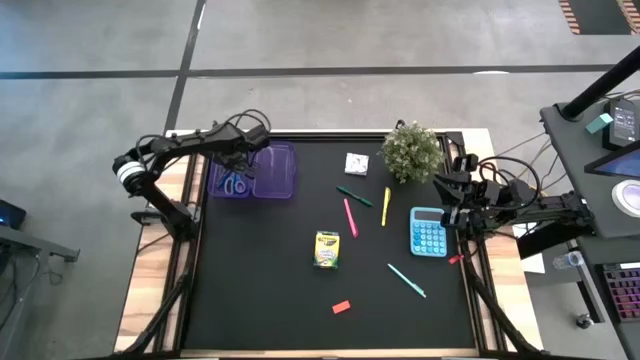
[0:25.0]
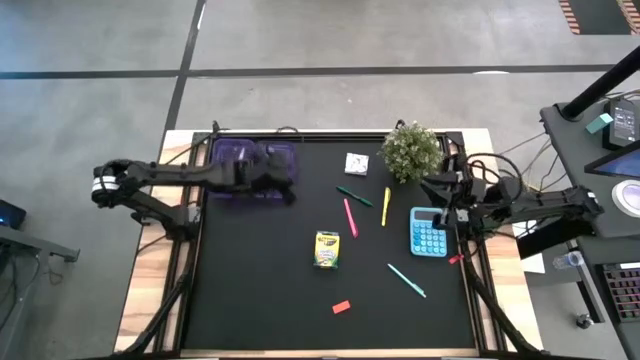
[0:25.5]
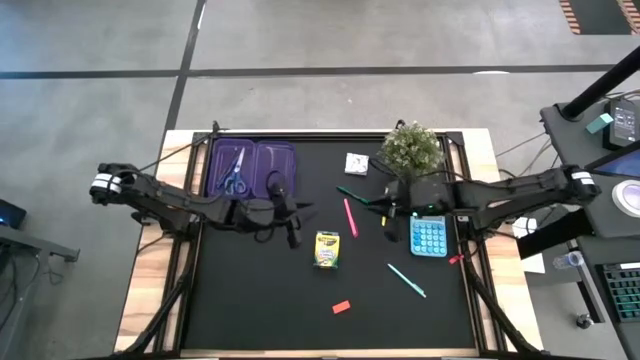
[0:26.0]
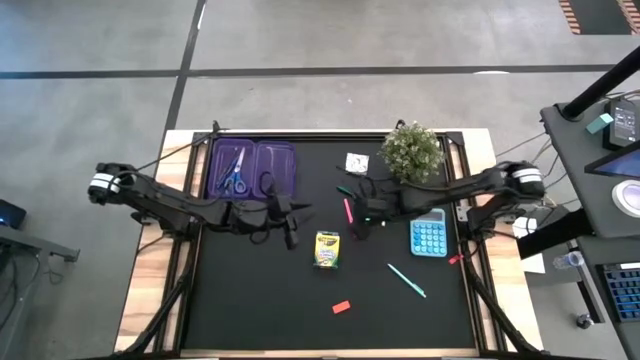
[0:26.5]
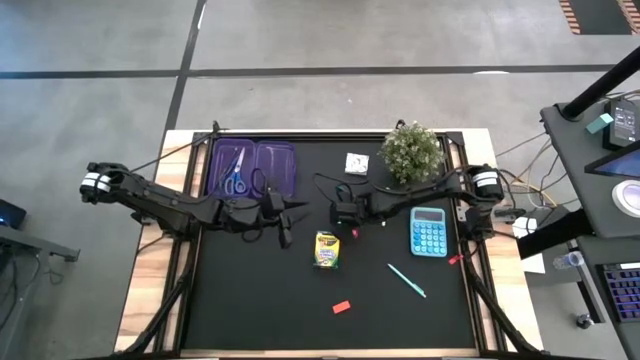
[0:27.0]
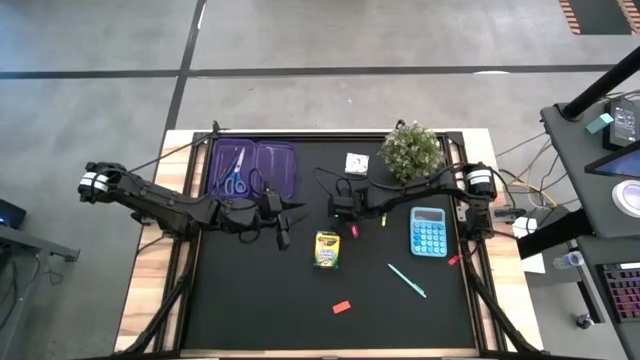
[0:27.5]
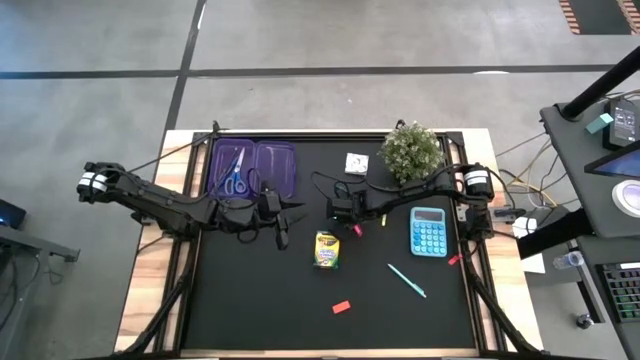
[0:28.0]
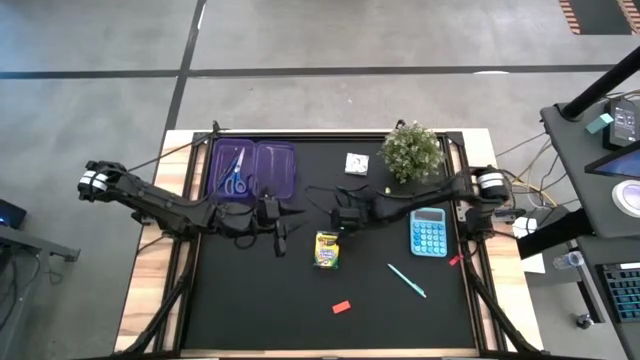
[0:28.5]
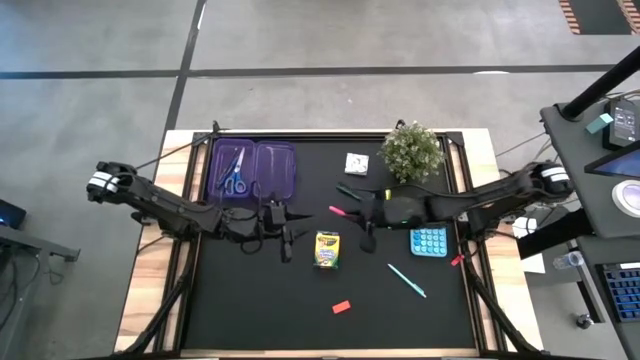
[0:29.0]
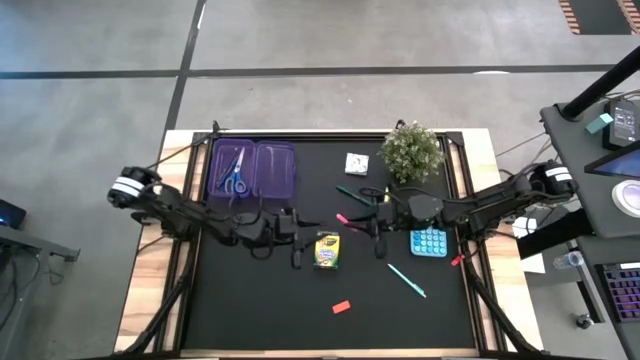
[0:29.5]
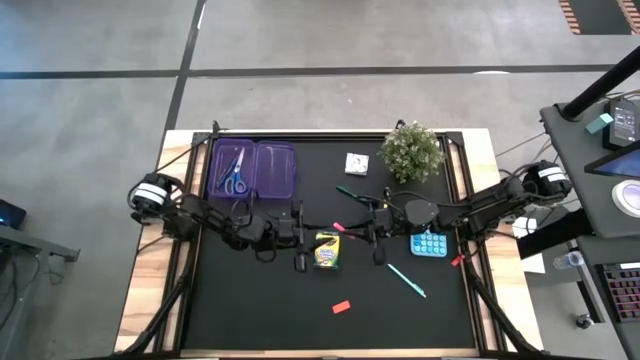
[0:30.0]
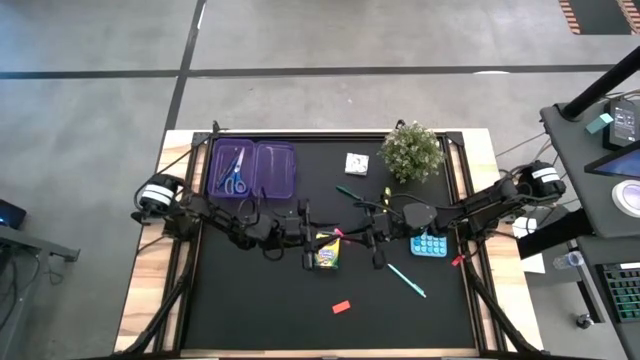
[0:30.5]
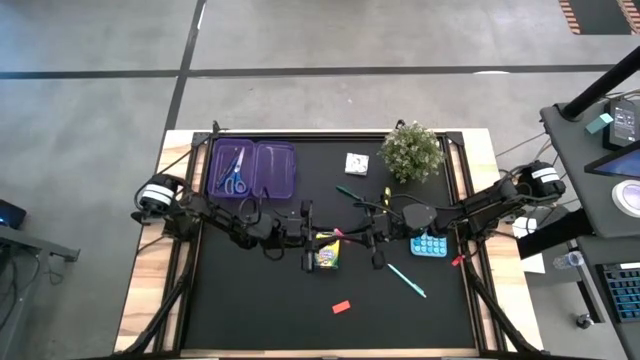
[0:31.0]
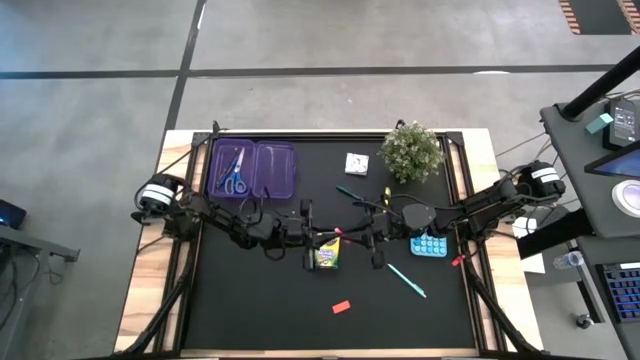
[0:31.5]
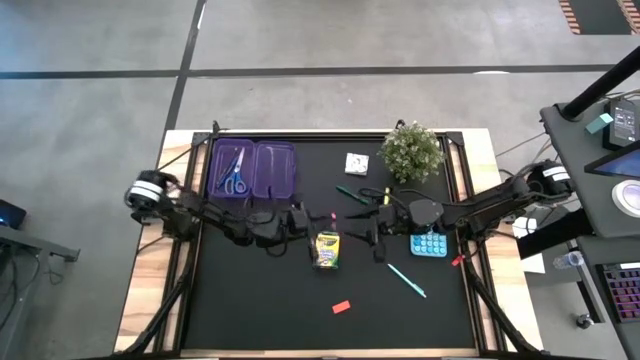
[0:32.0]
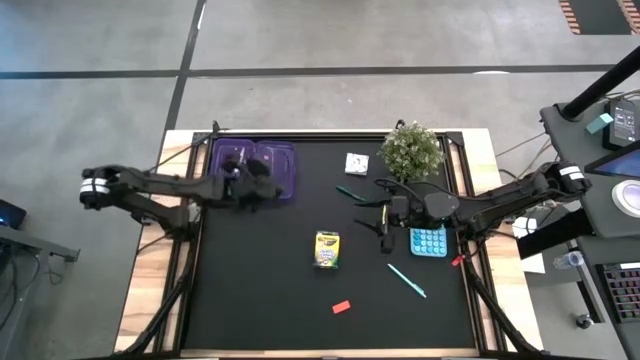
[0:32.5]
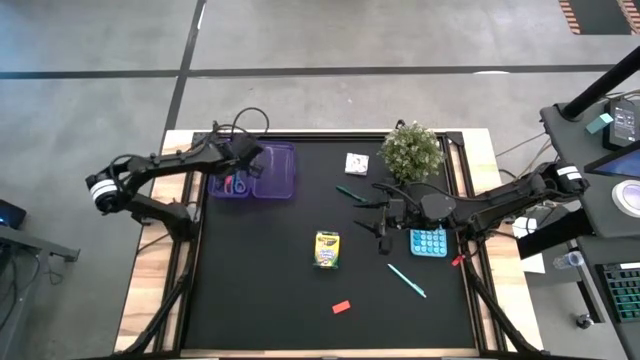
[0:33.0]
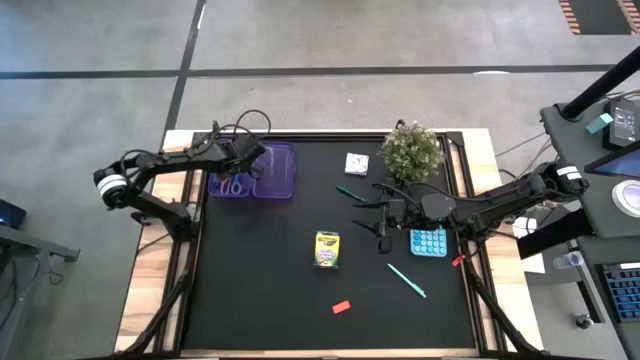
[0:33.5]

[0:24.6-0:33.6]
Task: Pack school essentials
Put the pink pen into the purple supply box

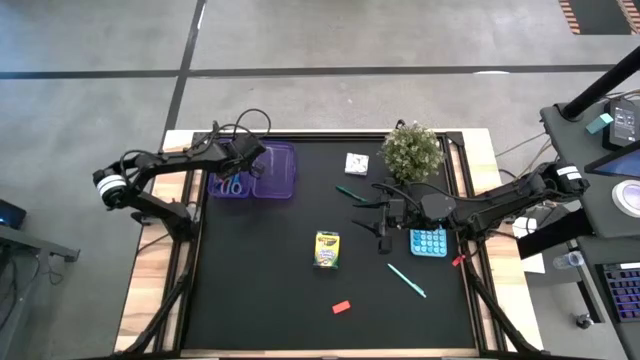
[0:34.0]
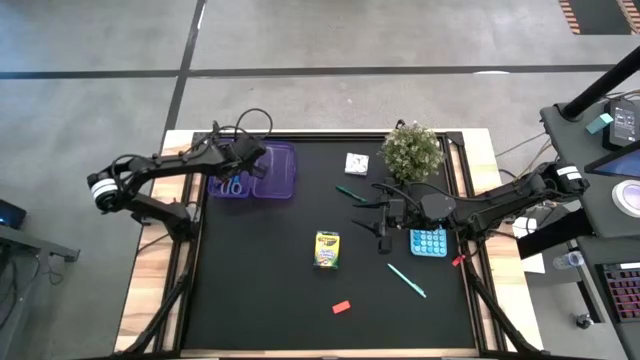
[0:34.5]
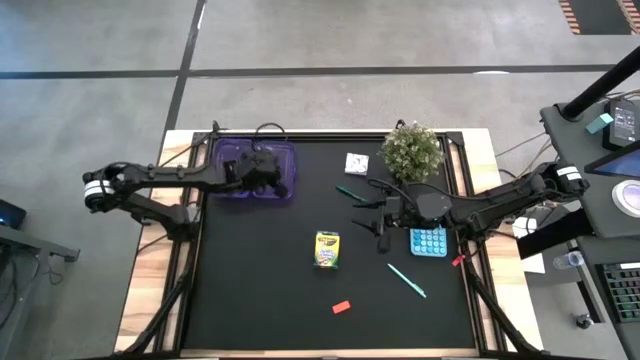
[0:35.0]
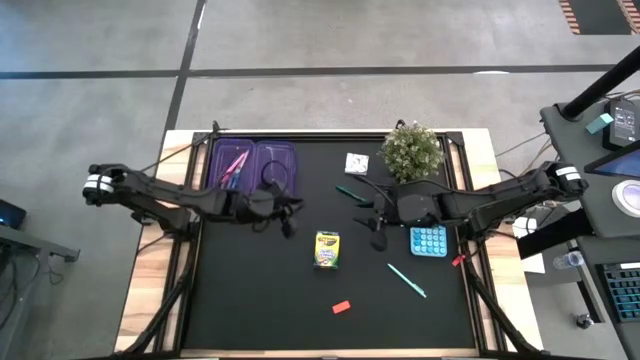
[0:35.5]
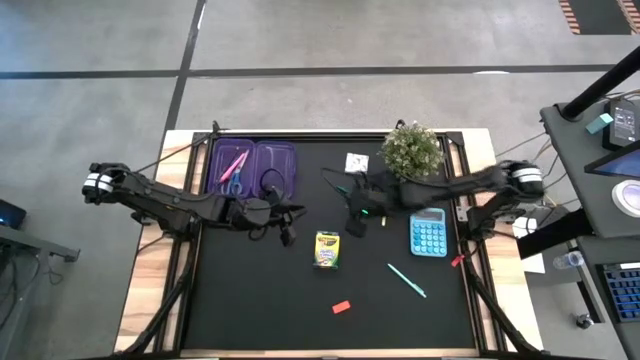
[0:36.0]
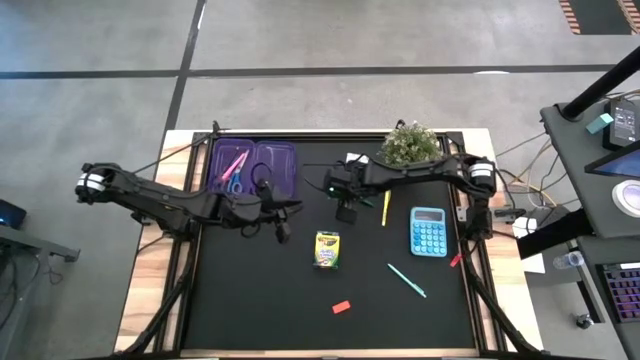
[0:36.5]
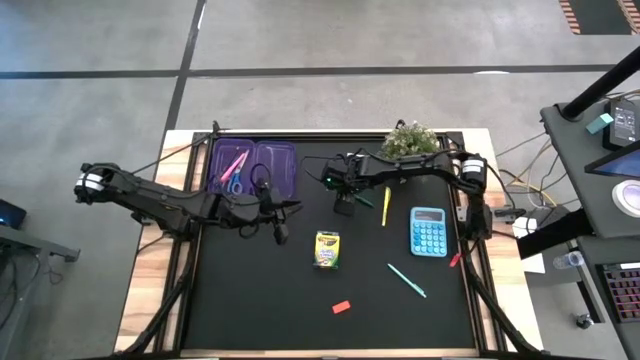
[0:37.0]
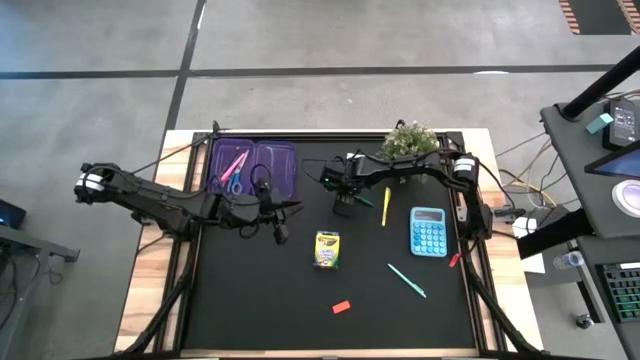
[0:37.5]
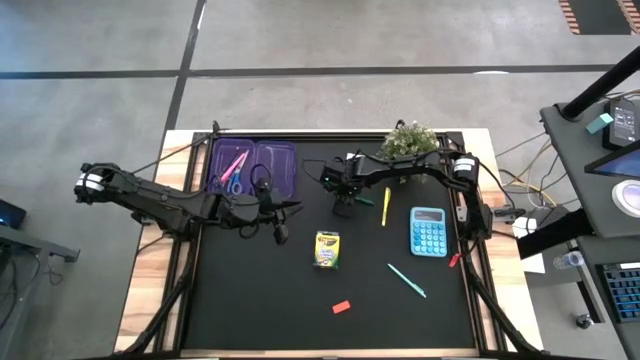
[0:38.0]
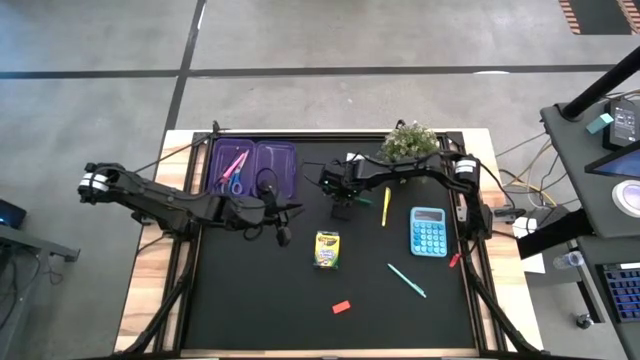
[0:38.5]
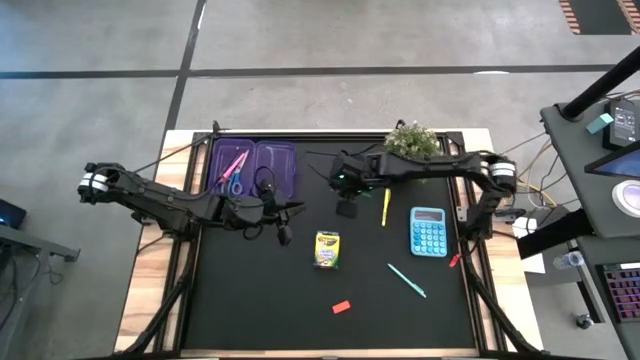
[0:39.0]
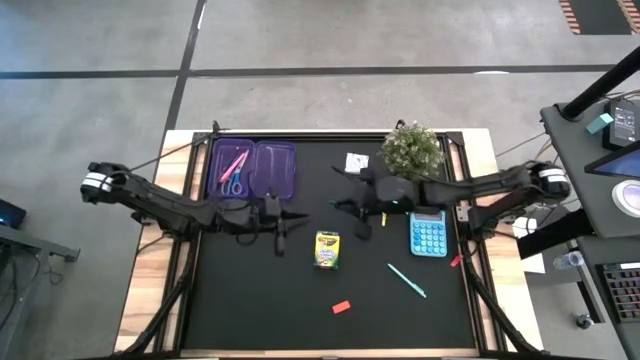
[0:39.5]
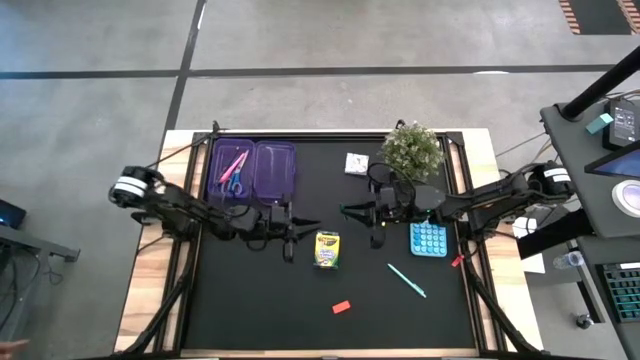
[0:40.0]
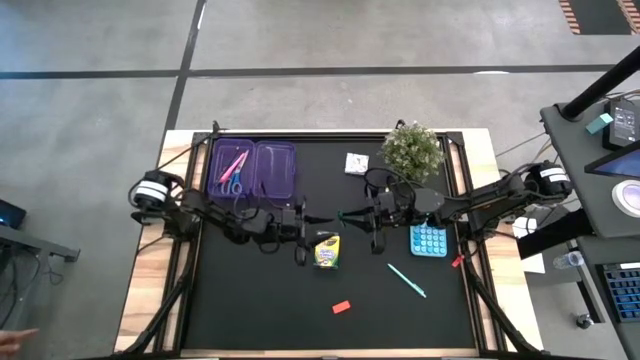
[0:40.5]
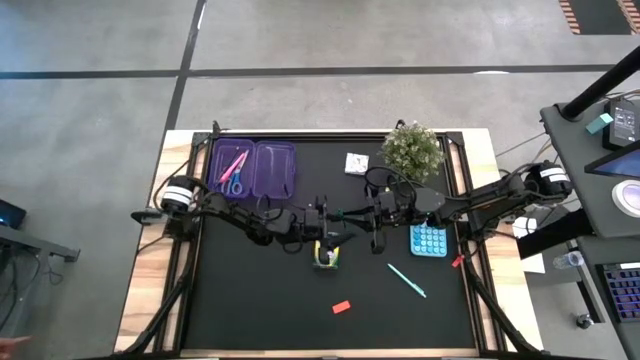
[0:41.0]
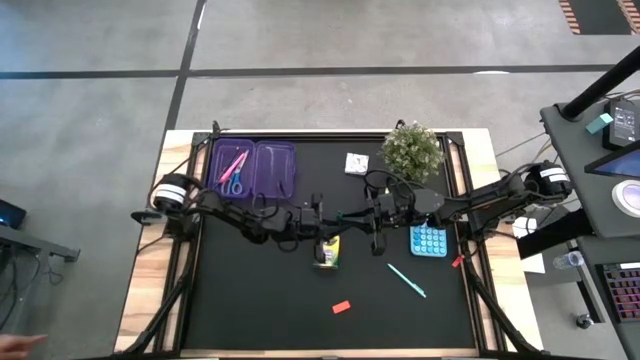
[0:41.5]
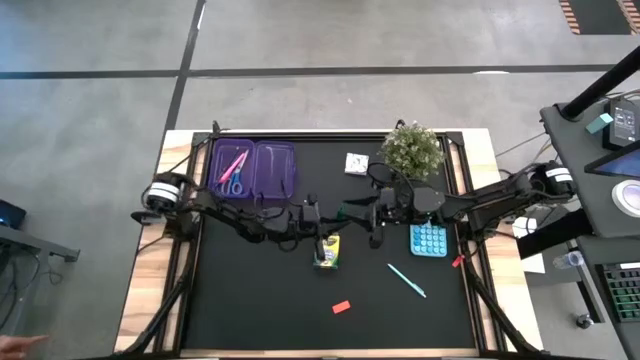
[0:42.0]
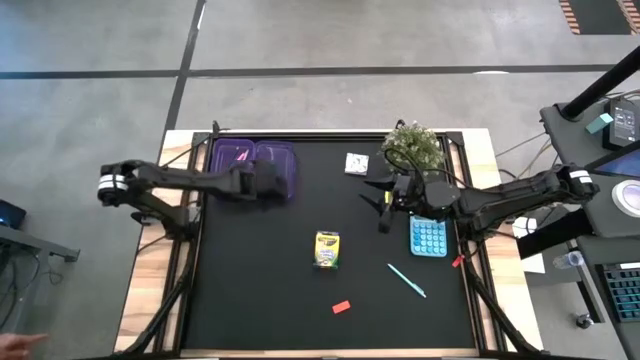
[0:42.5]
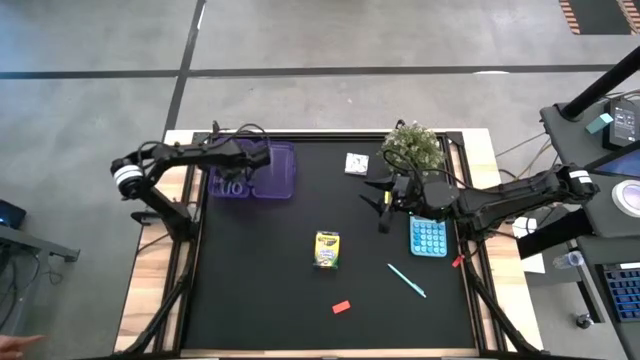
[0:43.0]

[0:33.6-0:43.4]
Put the green pen into the purple supply box

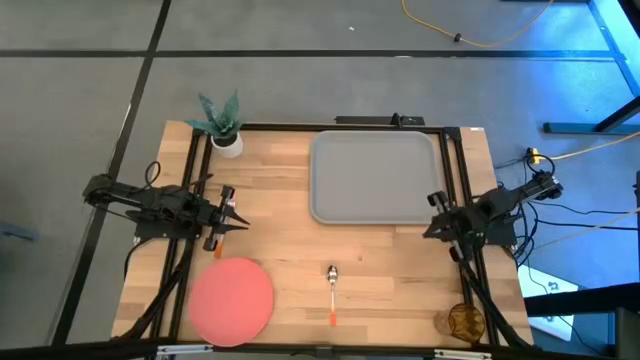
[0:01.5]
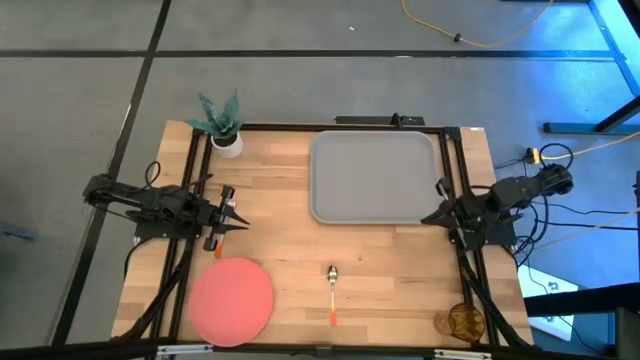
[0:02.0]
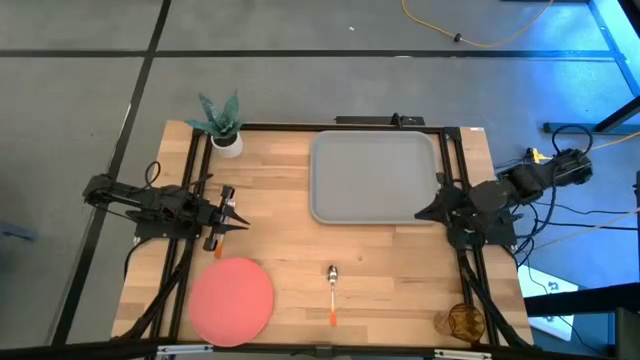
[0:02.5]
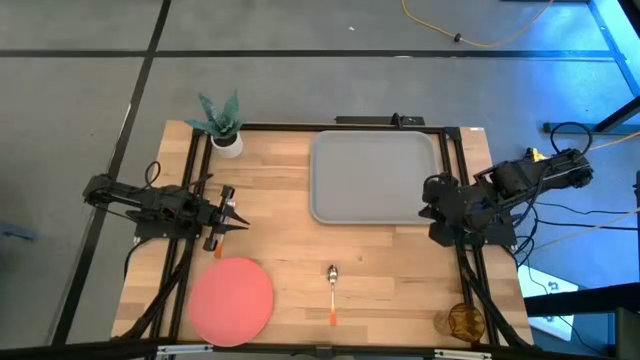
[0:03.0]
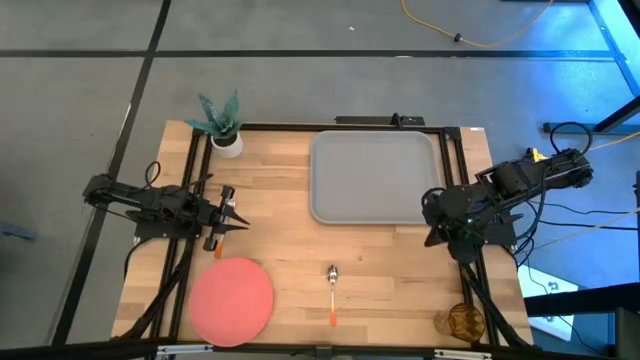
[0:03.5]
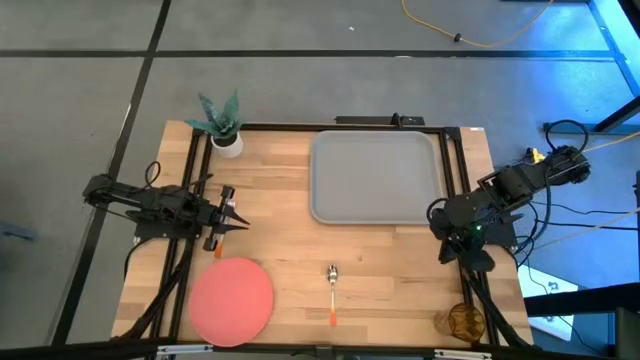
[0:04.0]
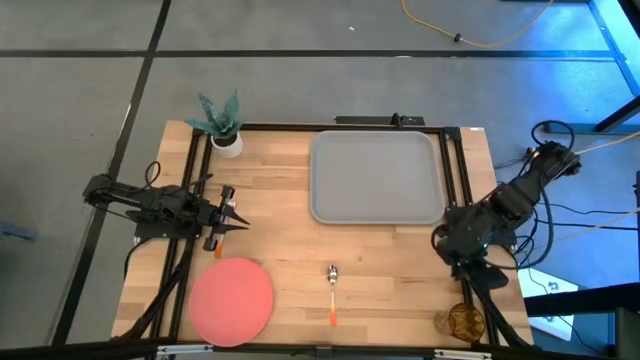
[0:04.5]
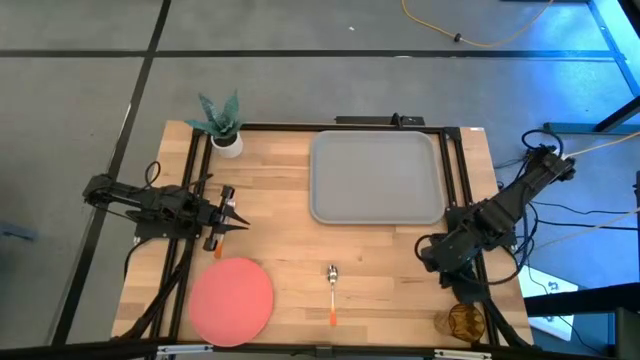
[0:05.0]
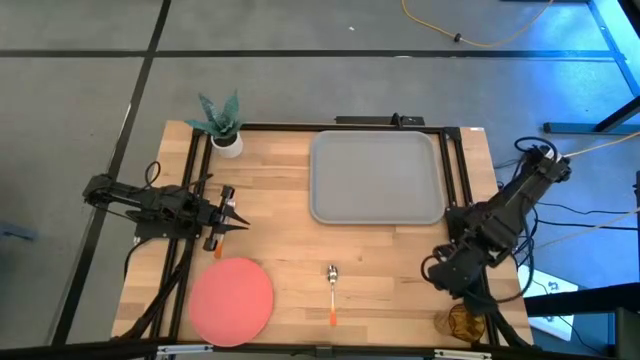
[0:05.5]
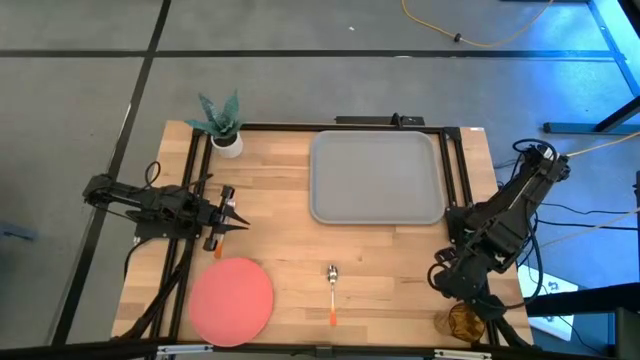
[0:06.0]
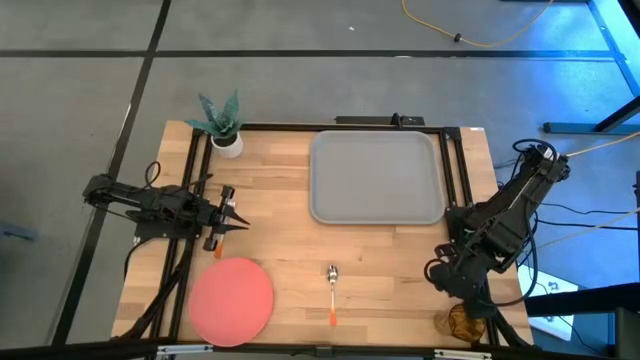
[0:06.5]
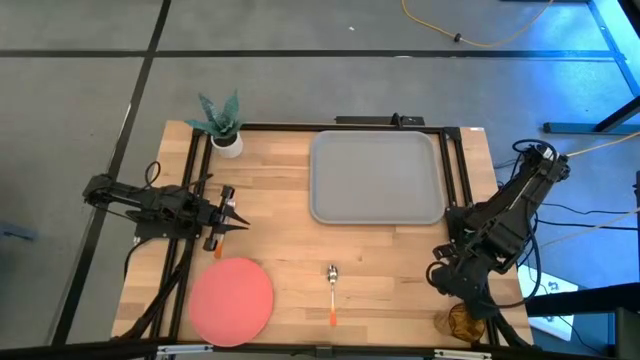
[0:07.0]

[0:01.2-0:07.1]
Task: Pick and place plate/cup/fork/spoon on tray
Put the orange glass on the top right of the gray serving tray
